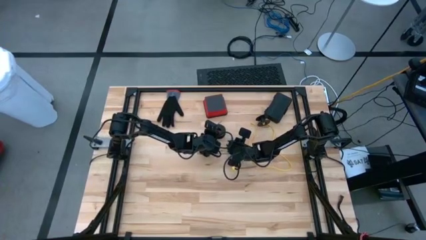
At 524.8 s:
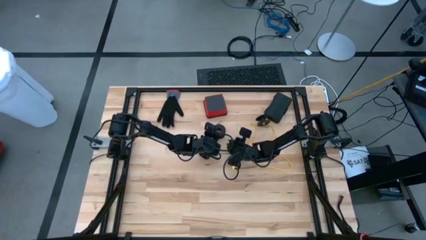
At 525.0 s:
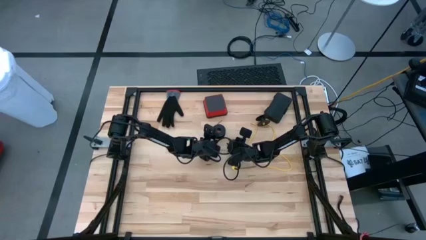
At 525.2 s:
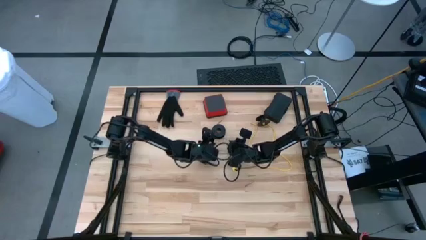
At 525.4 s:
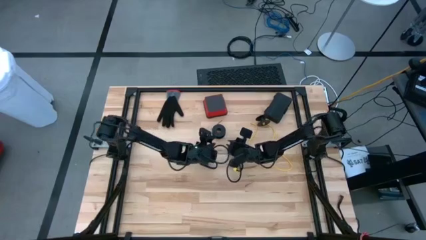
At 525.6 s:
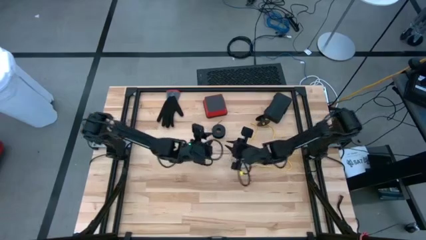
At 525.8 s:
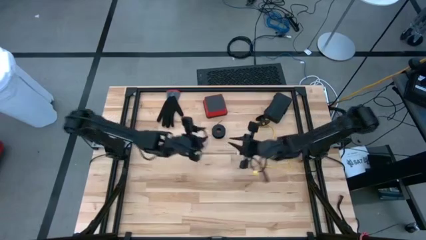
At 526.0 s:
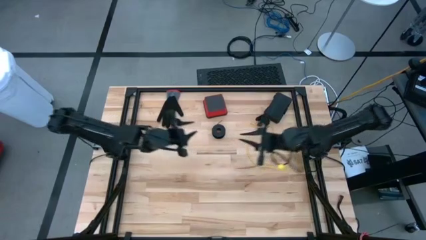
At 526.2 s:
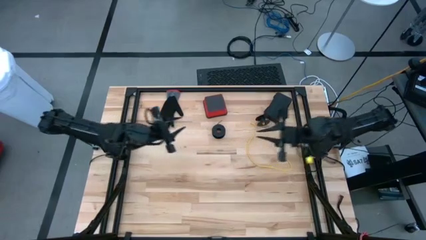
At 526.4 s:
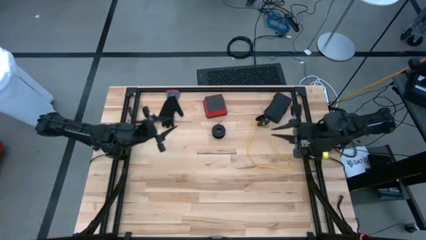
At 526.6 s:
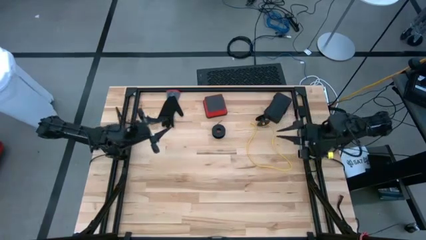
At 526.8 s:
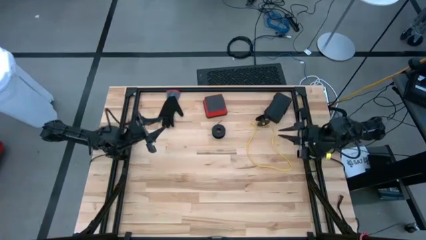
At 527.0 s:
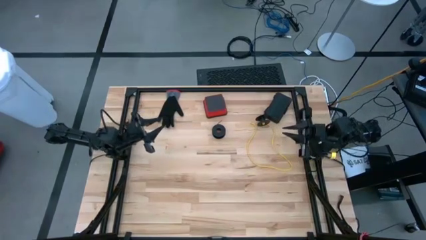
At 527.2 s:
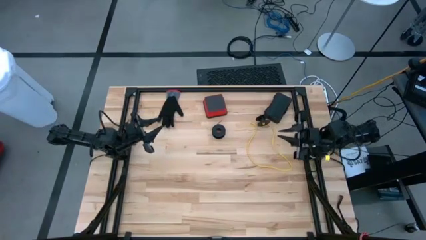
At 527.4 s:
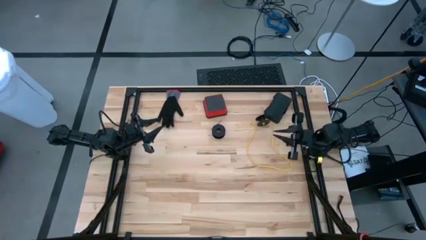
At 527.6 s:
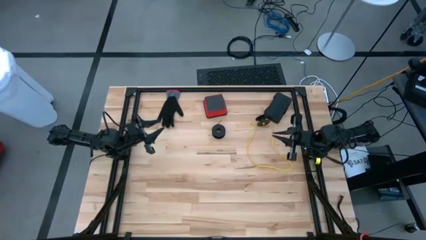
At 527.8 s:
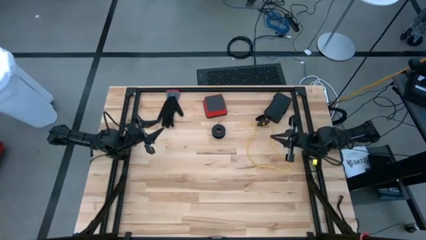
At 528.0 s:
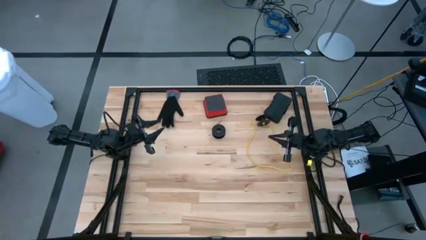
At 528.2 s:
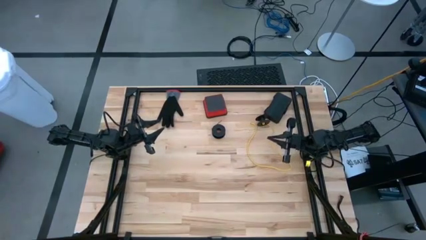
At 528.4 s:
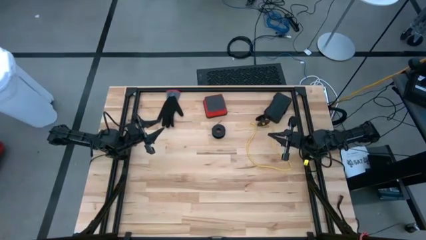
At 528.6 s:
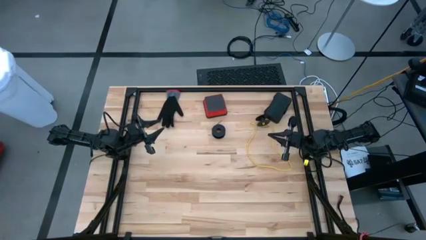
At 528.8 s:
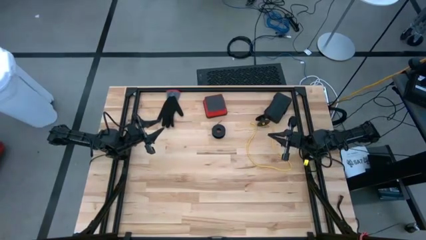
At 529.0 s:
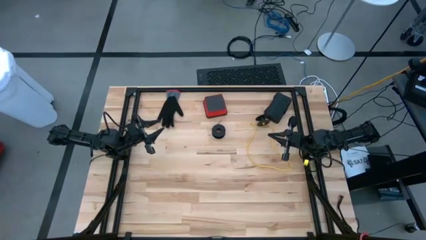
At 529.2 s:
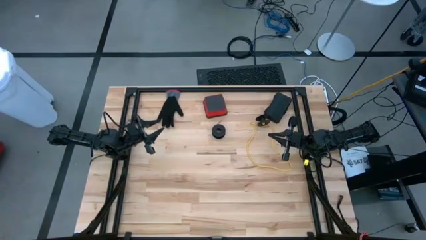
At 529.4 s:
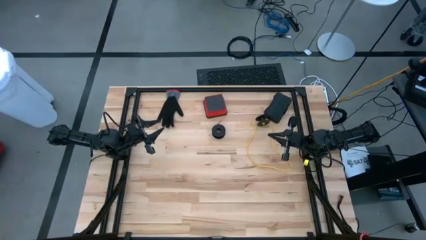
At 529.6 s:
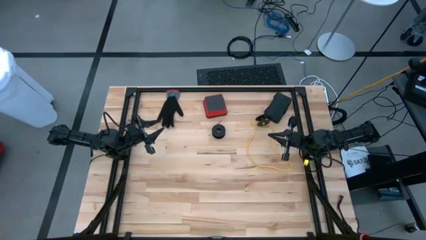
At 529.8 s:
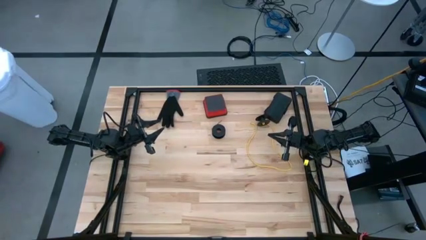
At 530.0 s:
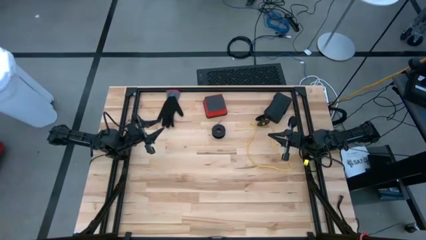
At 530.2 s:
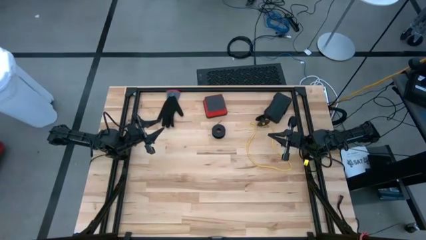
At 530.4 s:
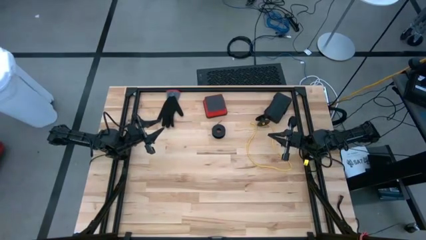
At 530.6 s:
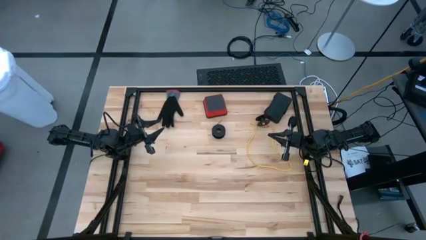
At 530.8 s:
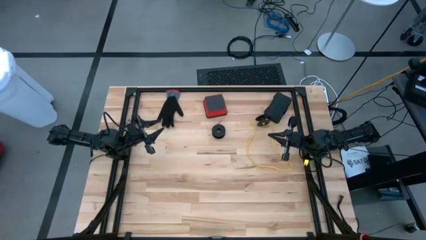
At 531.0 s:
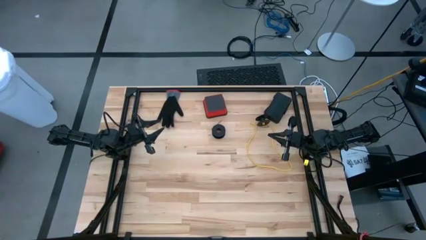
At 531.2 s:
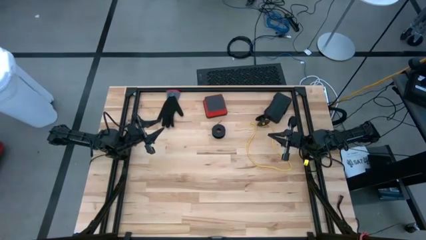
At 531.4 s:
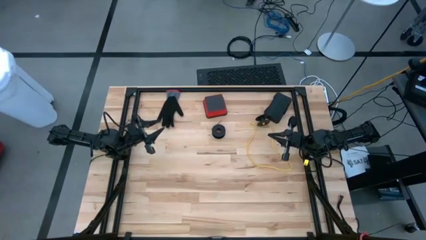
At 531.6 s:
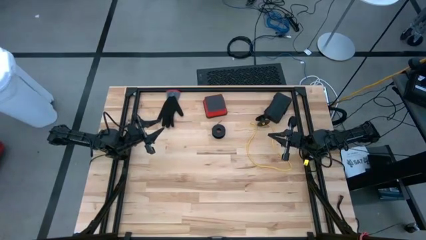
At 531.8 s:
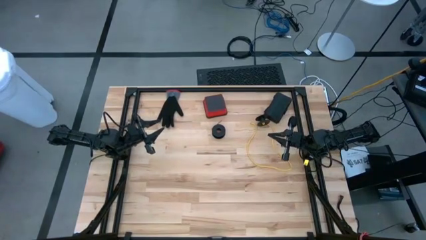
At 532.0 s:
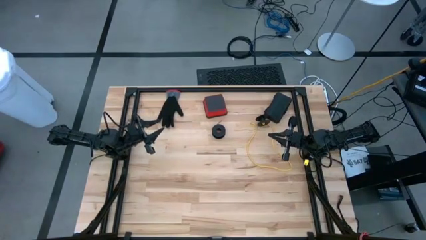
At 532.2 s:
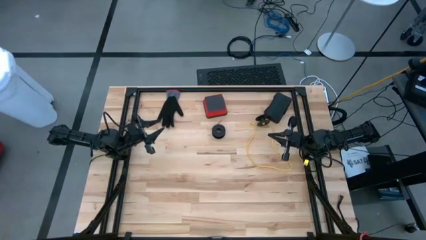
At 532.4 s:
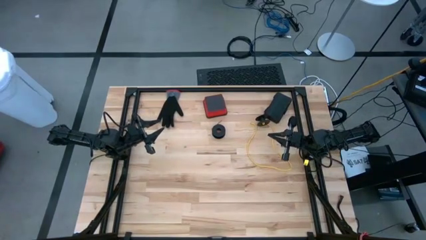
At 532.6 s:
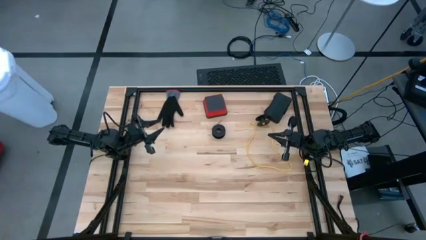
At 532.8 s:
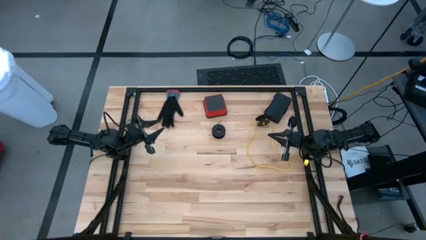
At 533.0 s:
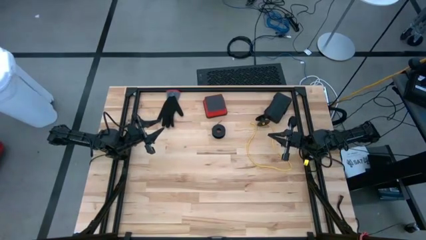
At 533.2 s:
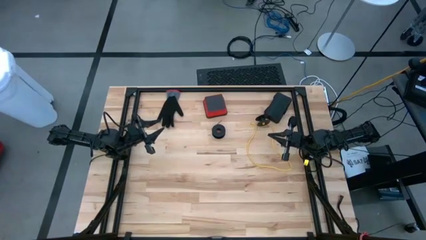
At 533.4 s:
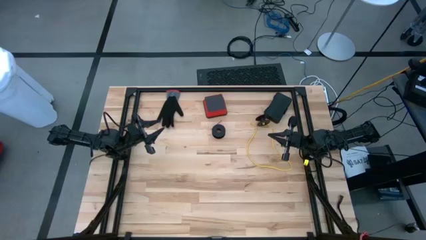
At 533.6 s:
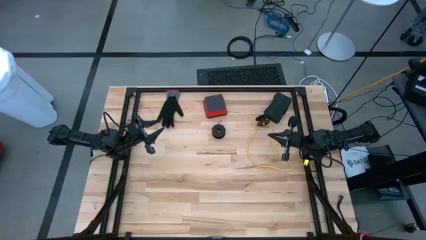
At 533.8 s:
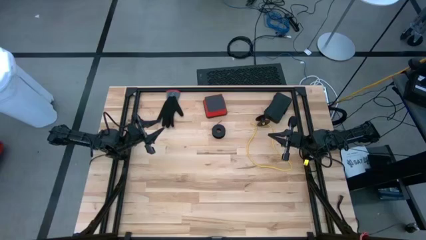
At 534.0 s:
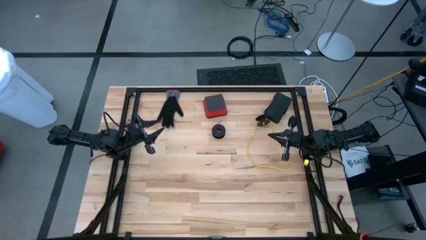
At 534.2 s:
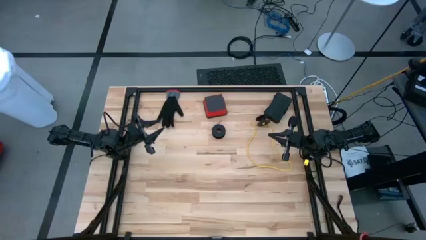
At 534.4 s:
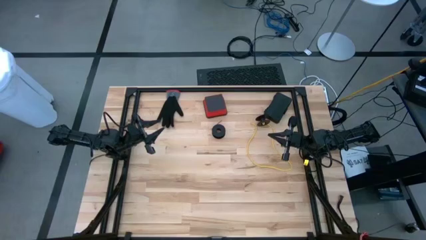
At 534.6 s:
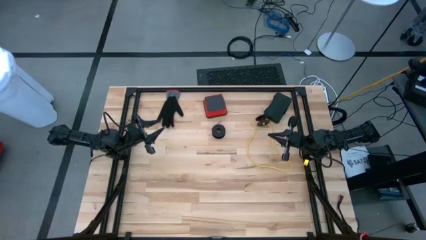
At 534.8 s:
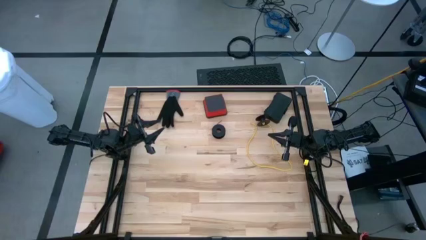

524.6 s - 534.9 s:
Task: Coil cords
Return to Home Position

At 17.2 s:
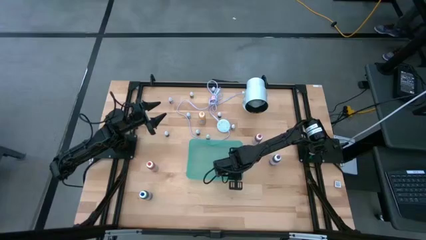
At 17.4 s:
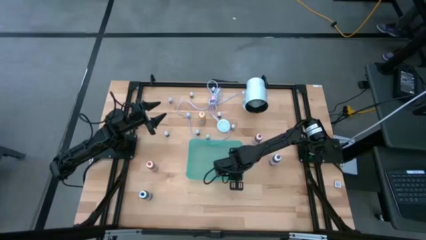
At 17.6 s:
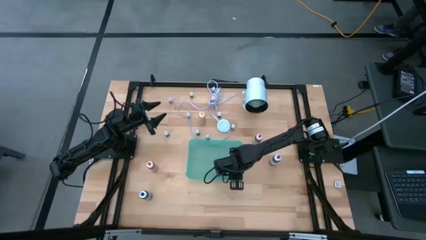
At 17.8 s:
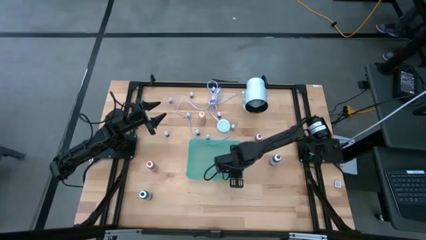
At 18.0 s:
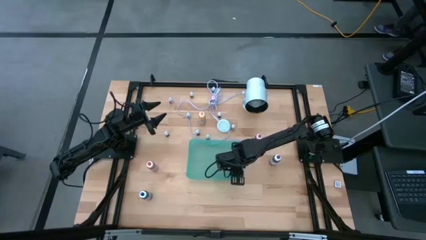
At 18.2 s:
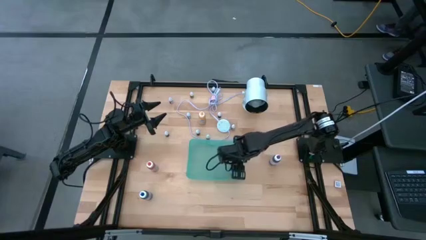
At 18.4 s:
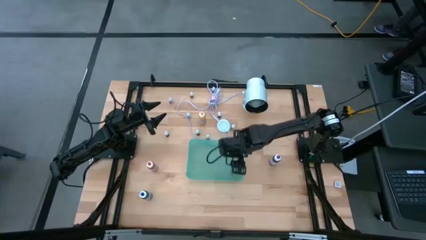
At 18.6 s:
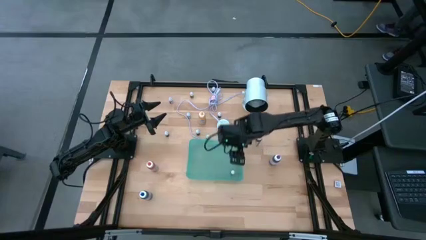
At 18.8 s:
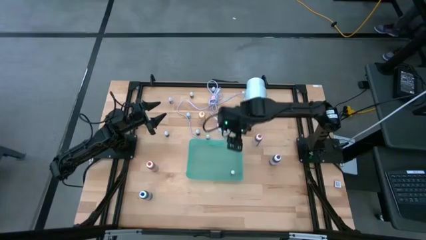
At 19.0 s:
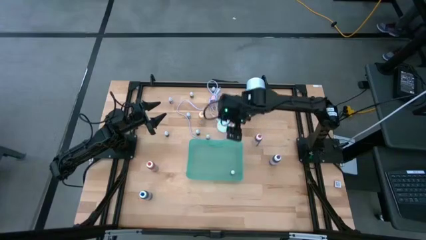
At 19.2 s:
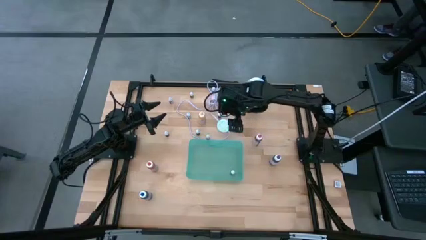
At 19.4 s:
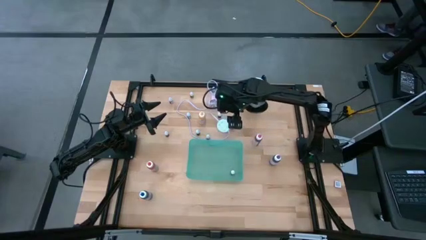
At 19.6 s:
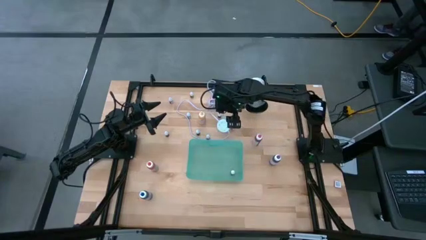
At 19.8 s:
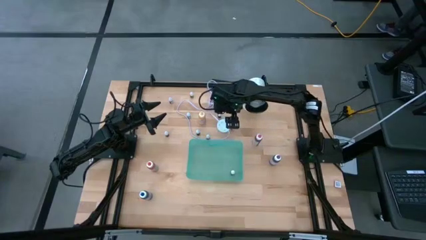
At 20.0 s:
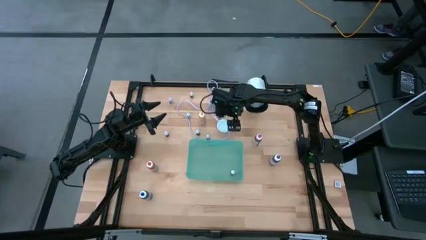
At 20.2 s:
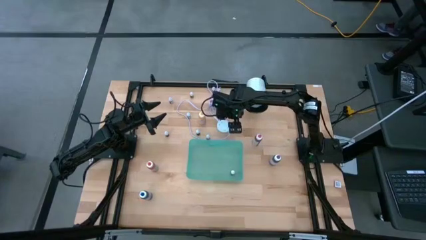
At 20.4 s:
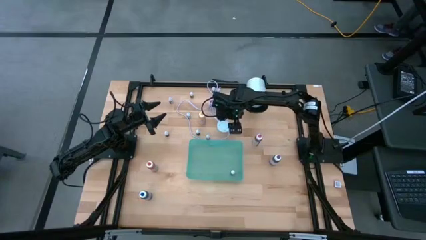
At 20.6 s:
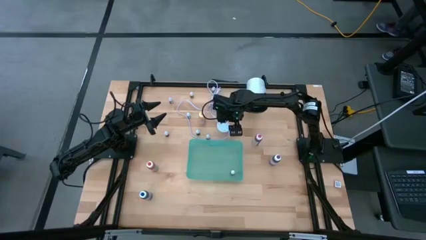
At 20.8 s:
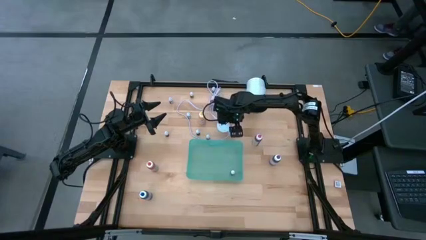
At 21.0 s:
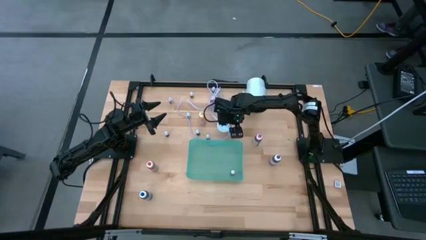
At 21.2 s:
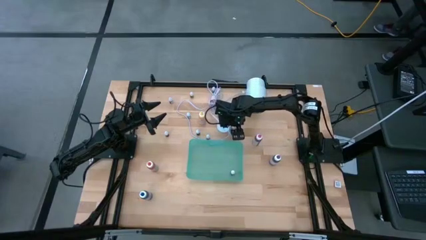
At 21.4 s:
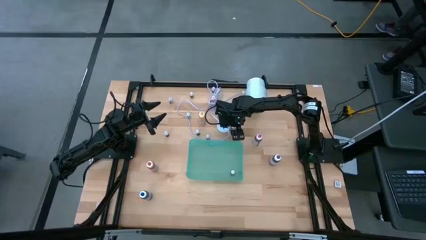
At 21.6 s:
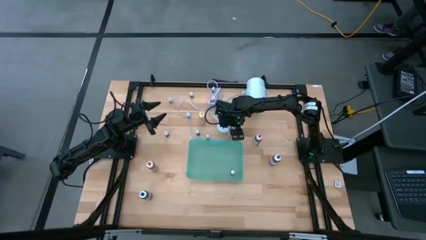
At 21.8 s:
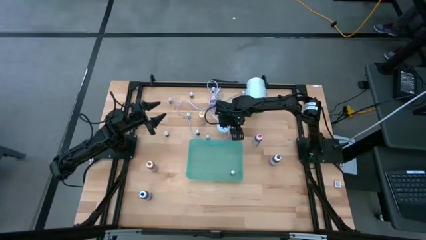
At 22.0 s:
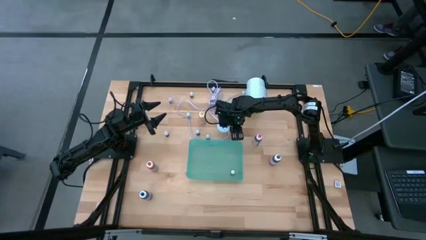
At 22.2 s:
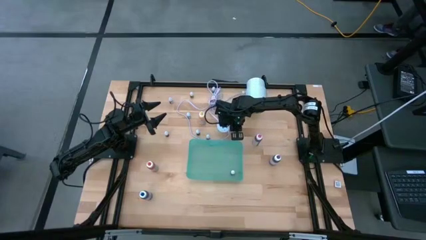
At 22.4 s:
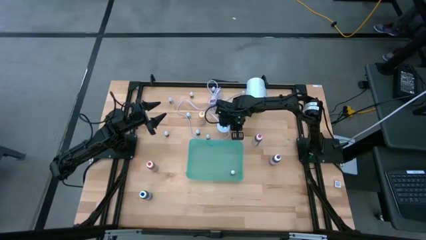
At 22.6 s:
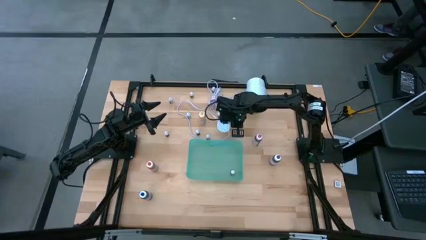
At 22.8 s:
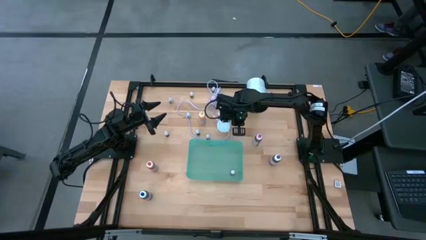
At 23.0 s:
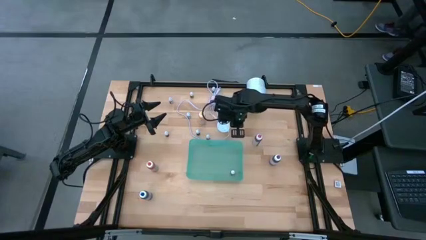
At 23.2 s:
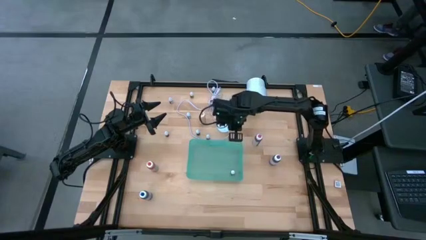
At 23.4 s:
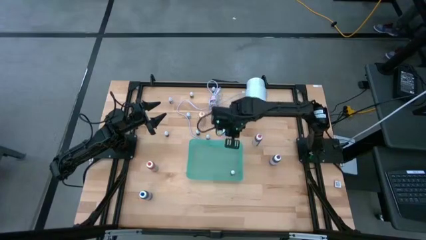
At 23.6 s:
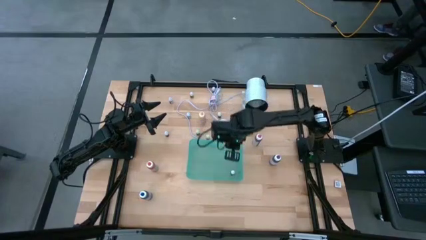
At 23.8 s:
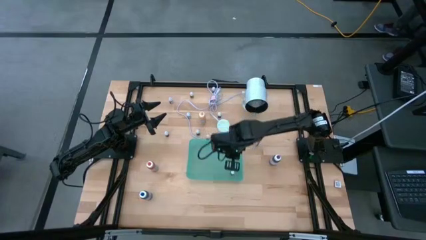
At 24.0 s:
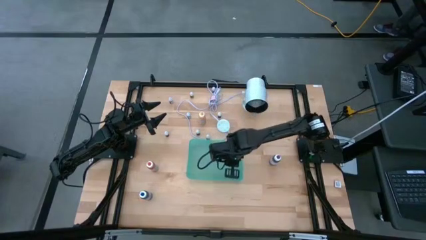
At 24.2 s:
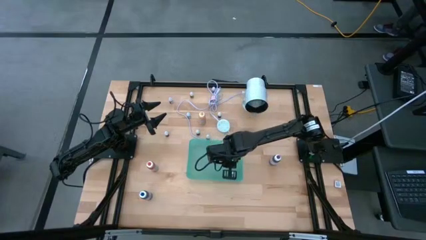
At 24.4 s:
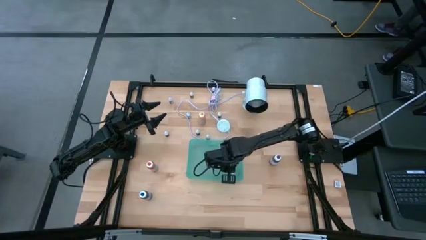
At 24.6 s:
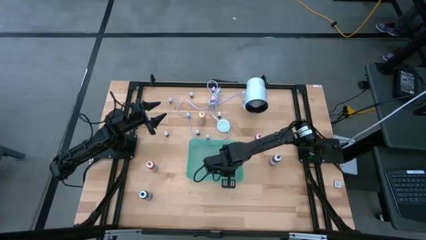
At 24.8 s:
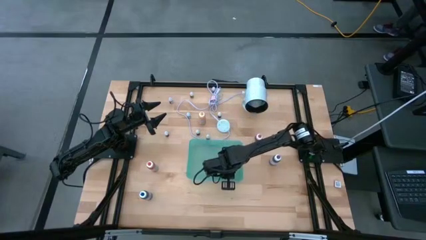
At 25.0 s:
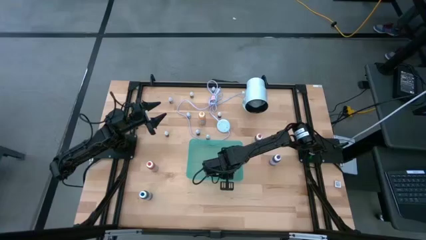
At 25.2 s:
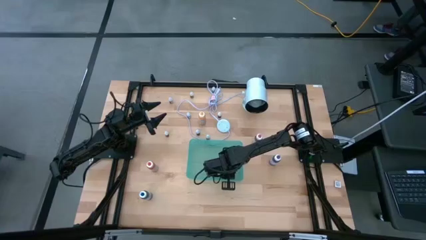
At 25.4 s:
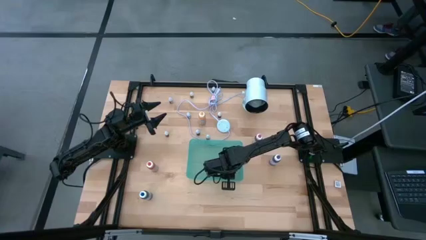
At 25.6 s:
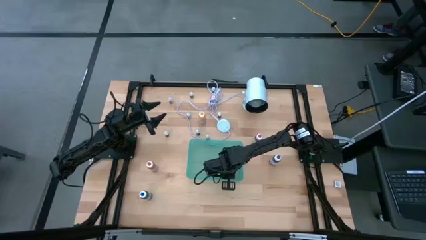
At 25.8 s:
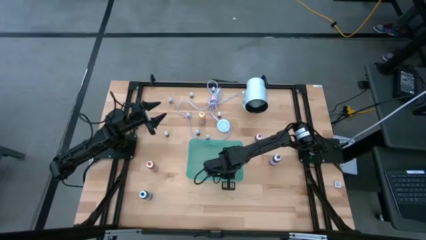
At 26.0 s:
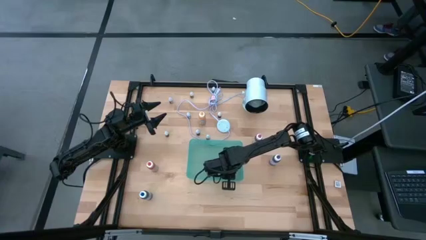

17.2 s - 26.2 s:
Task: Pick & Place food coloring
Put the top small pink food coloring bottle into the bin
